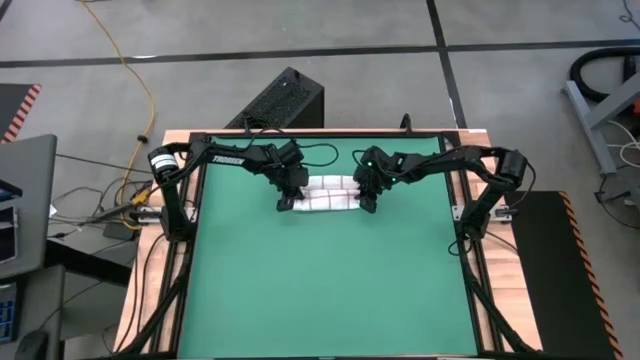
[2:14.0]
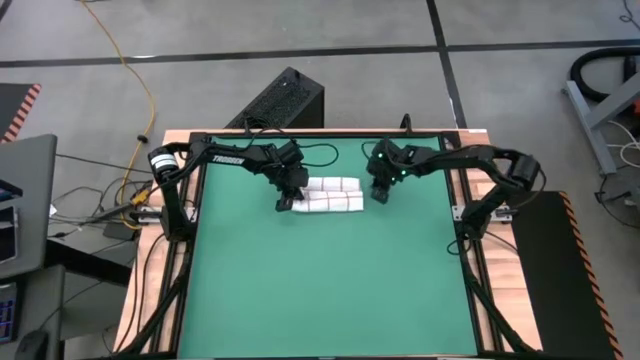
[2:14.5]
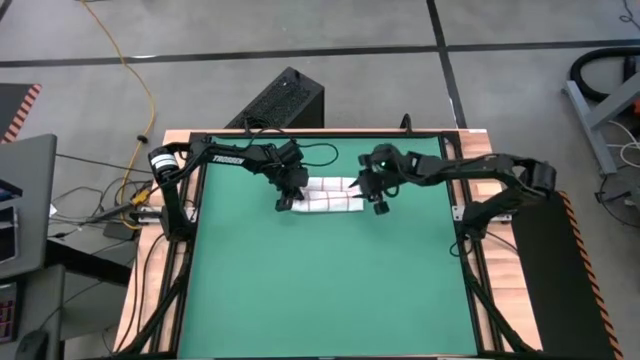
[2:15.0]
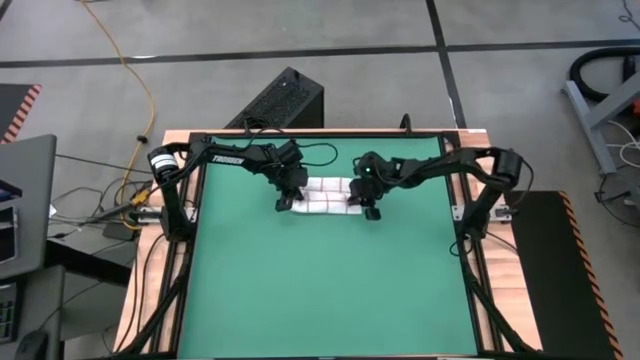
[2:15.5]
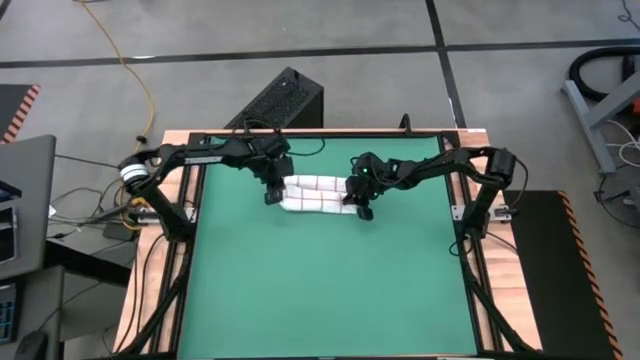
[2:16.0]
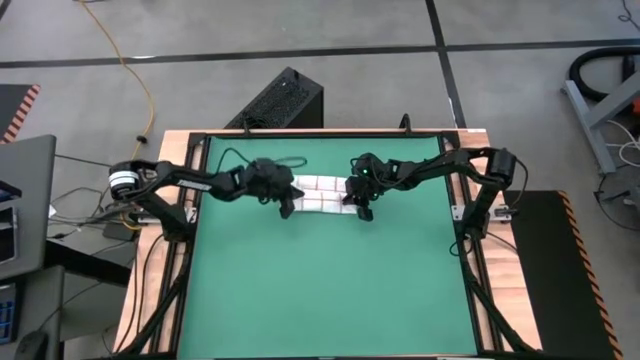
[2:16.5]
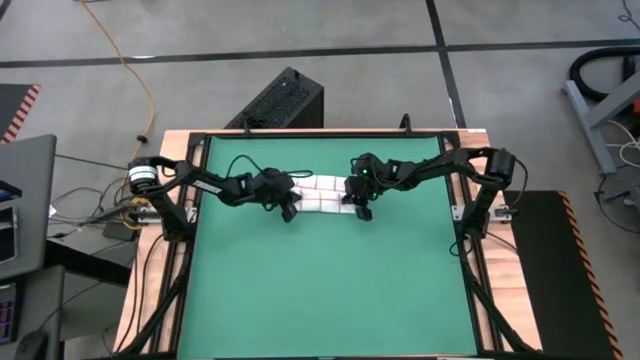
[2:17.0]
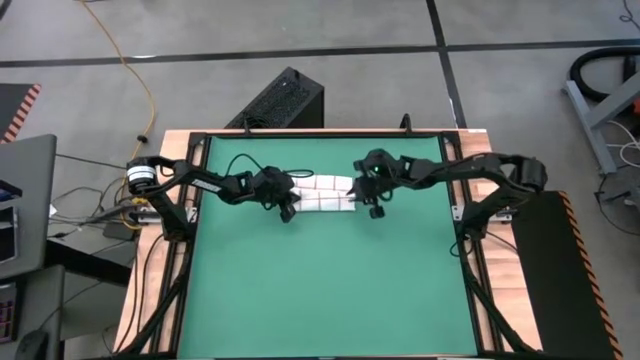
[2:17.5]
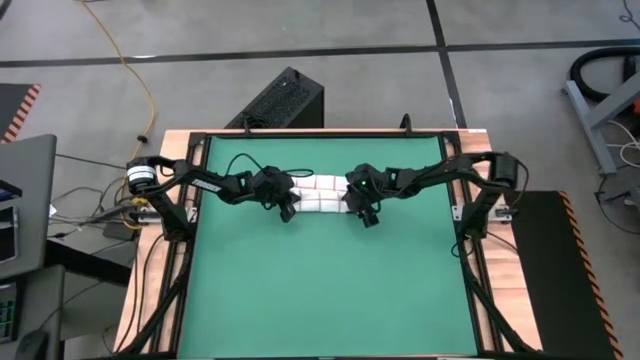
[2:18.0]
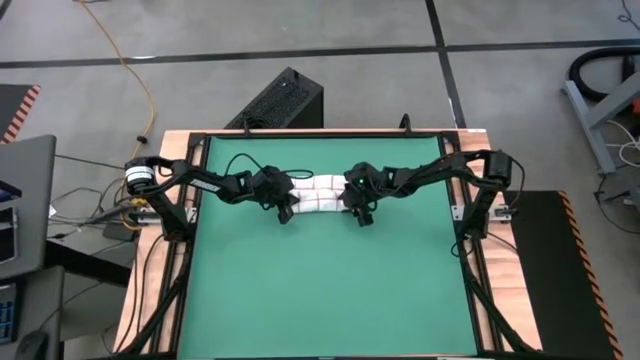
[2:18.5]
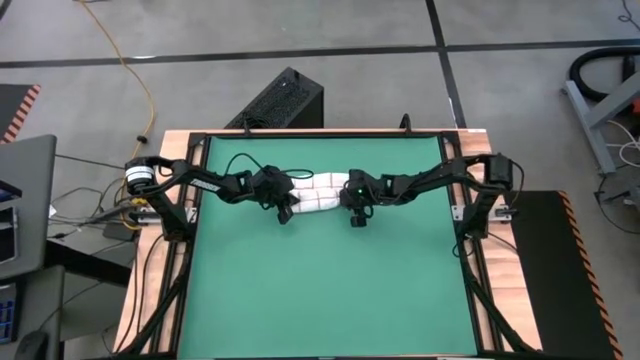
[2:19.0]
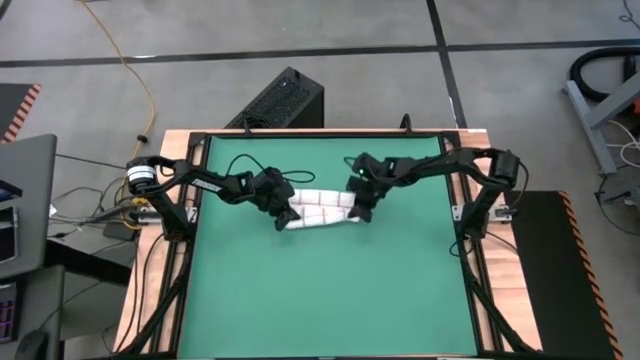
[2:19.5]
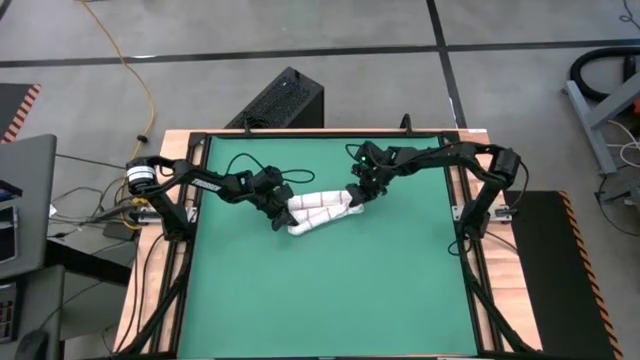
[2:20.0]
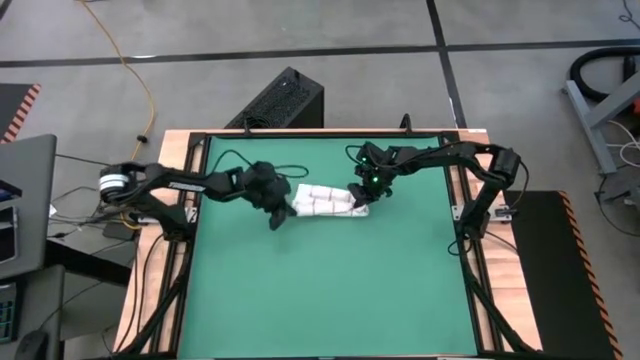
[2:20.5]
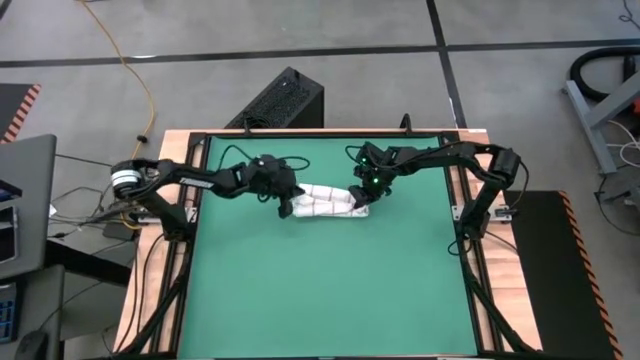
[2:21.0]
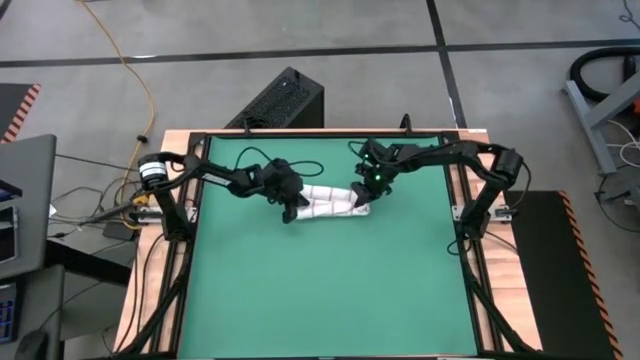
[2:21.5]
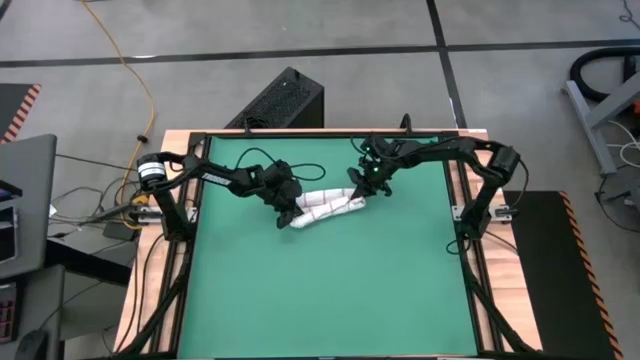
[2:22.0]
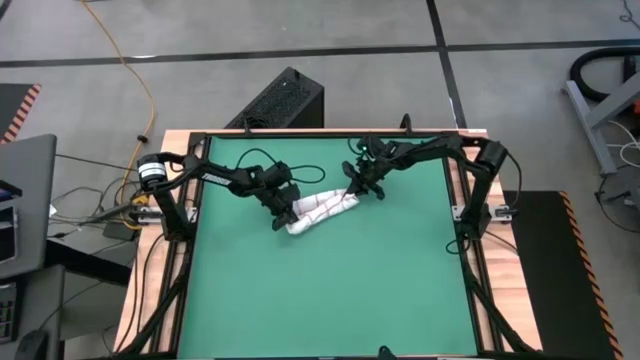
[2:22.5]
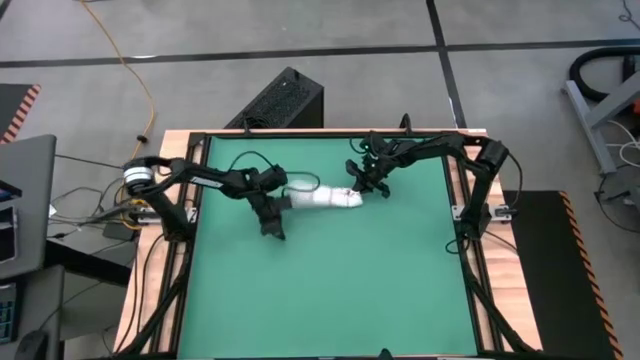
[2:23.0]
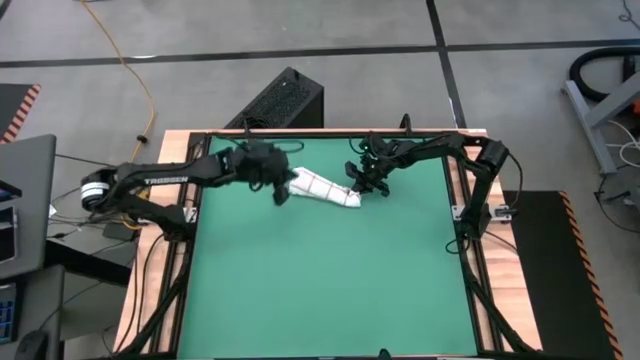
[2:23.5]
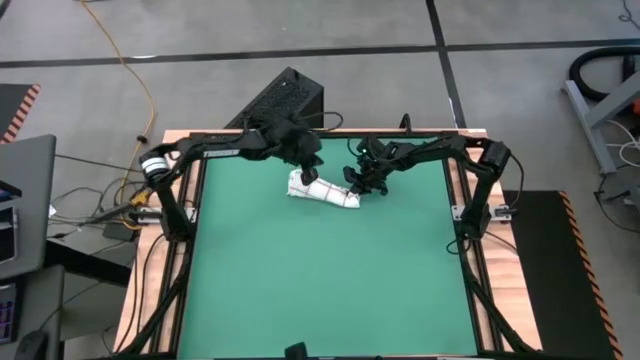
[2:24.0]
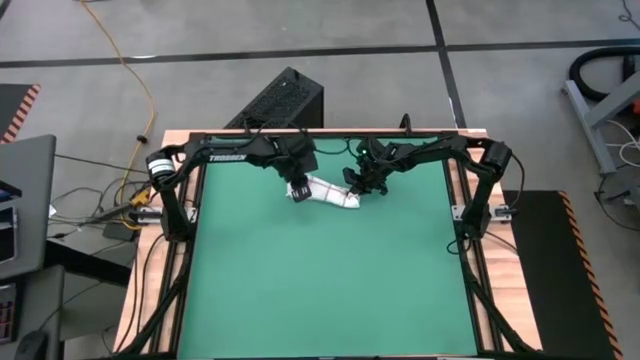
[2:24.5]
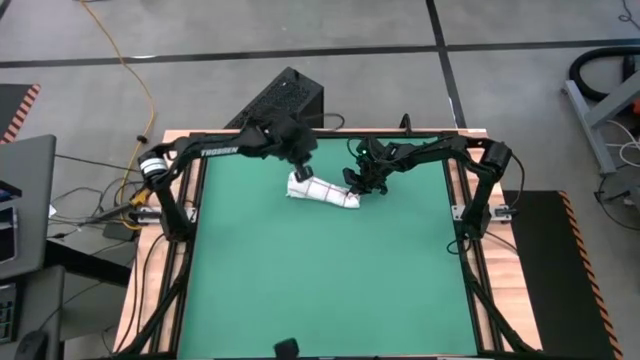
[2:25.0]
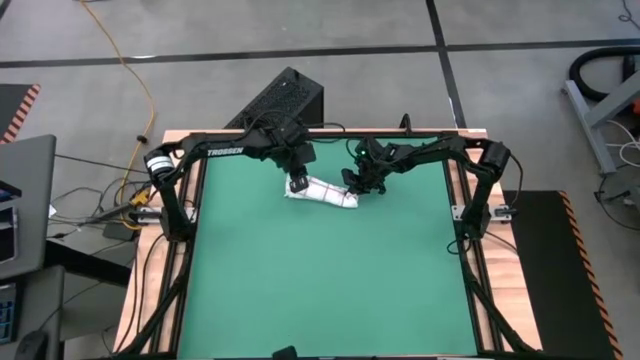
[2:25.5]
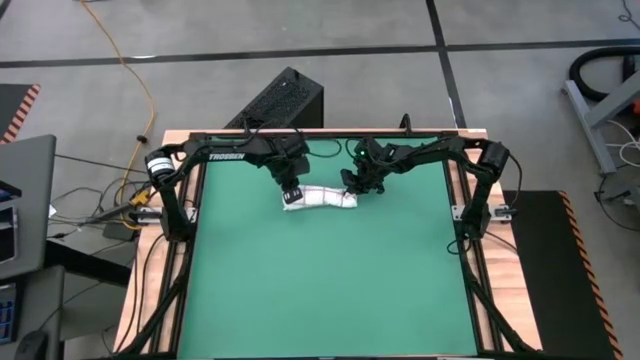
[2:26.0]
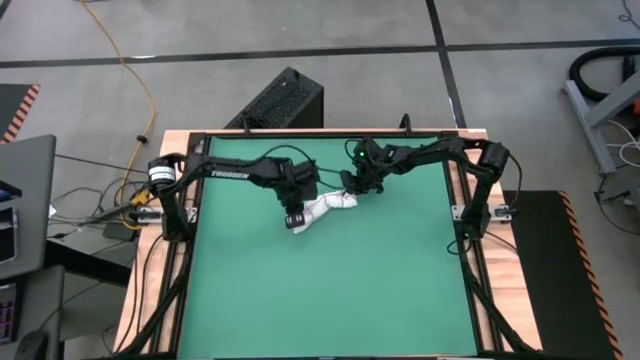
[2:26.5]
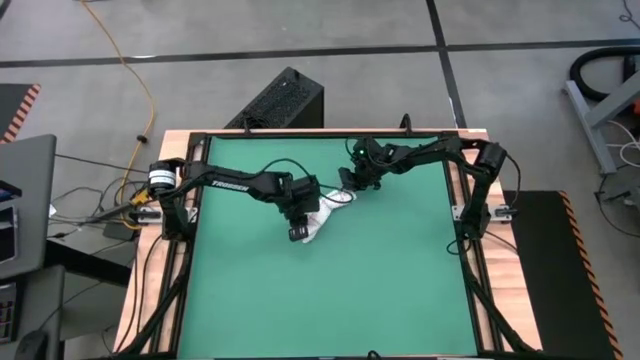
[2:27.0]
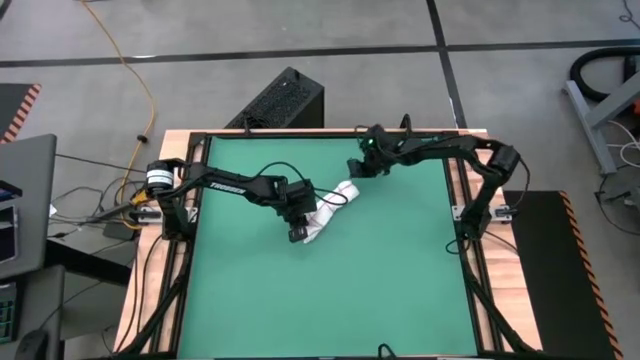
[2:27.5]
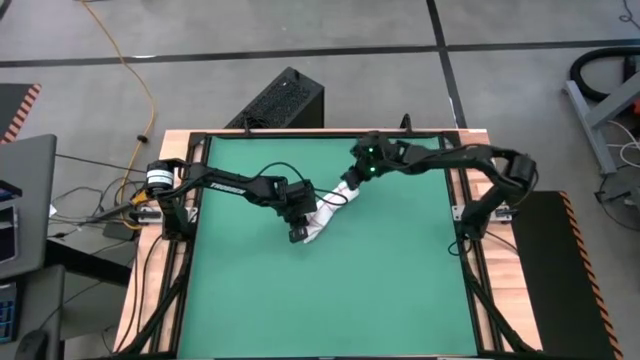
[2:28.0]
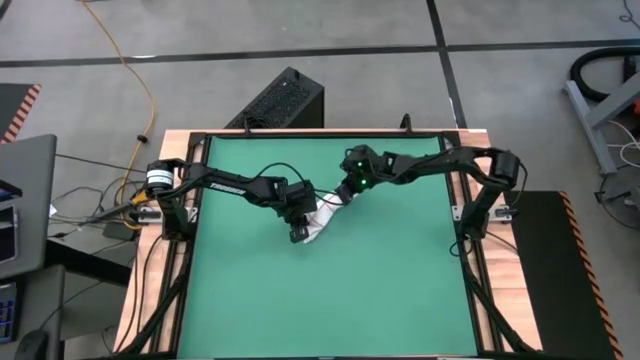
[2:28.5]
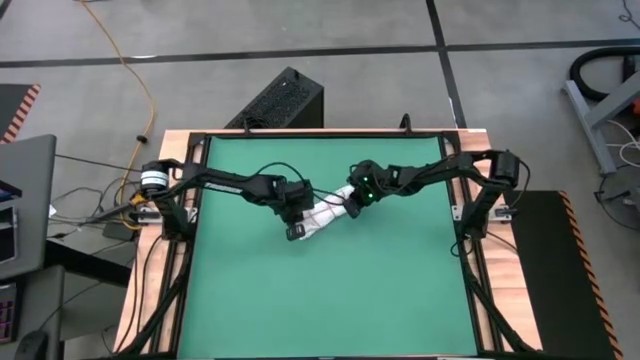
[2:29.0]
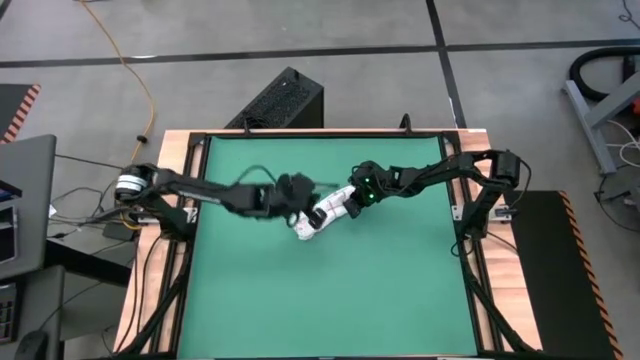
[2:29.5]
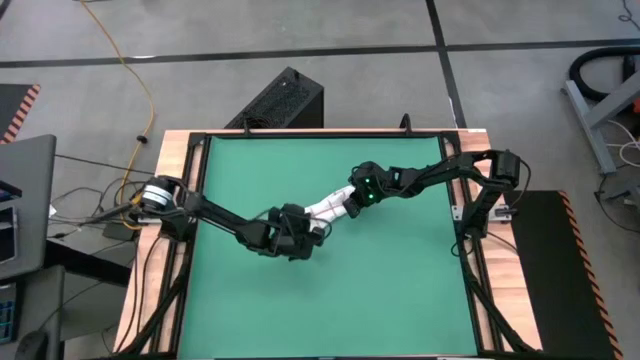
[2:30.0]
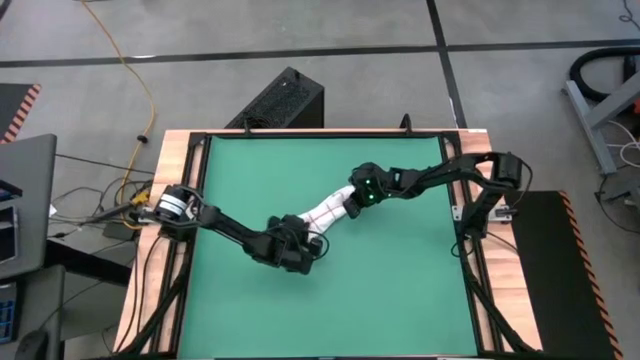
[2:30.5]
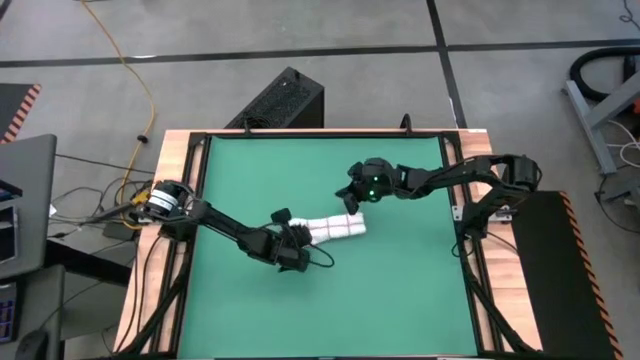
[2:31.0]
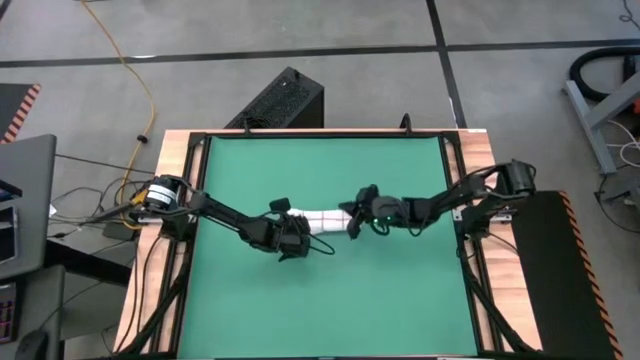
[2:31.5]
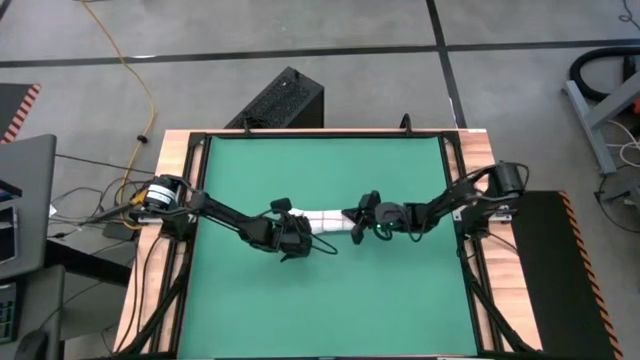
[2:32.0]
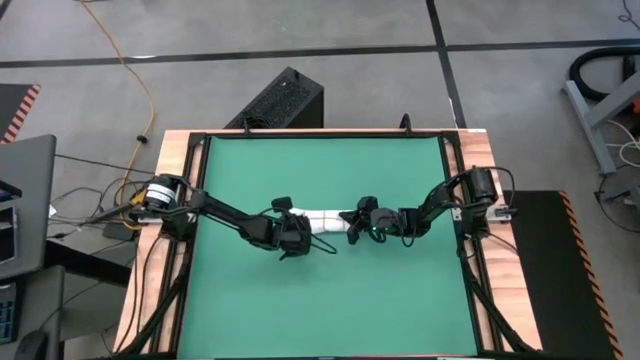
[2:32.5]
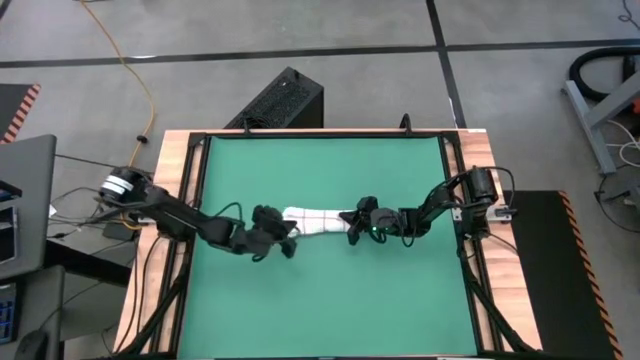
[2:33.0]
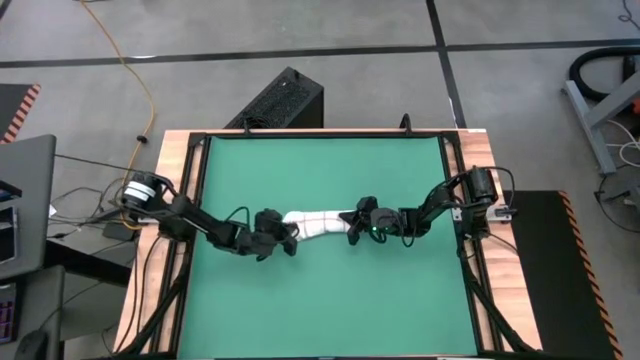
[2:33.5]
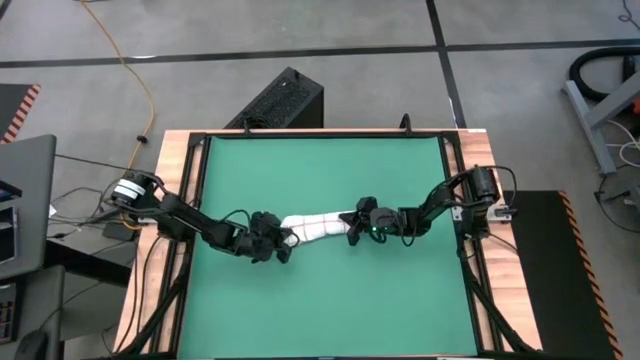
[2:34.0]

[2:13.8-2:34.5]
Task: Roll towel
Roll the white towel
